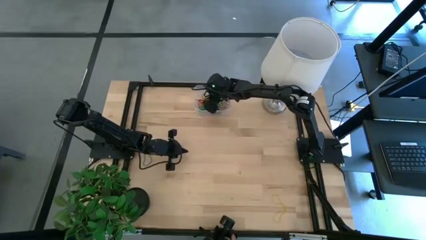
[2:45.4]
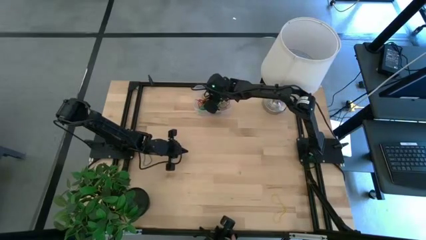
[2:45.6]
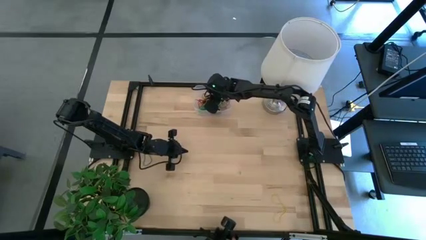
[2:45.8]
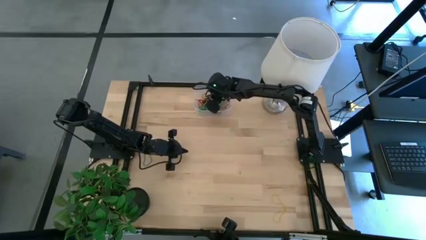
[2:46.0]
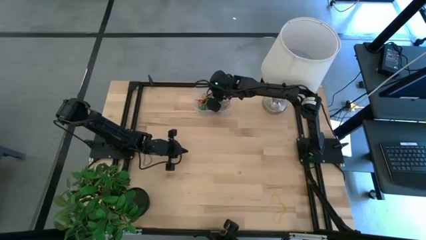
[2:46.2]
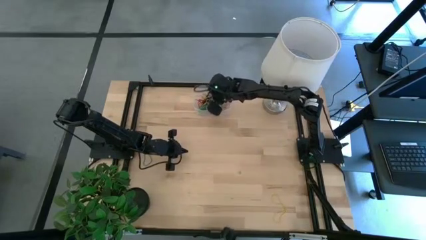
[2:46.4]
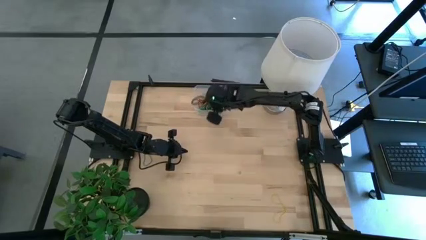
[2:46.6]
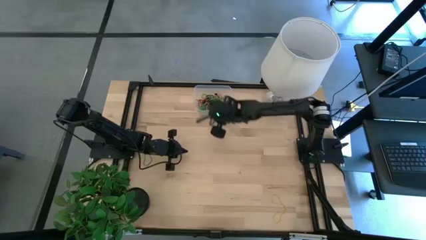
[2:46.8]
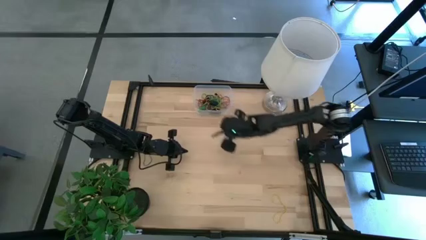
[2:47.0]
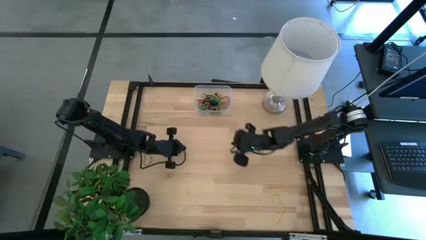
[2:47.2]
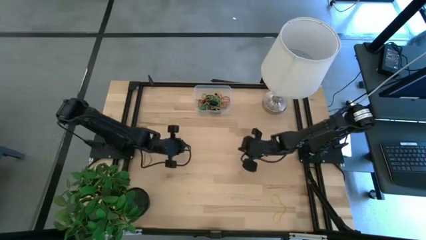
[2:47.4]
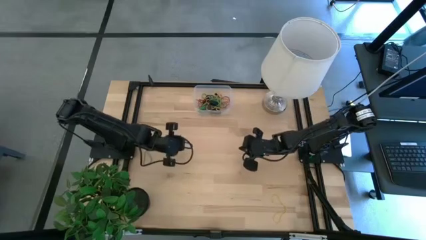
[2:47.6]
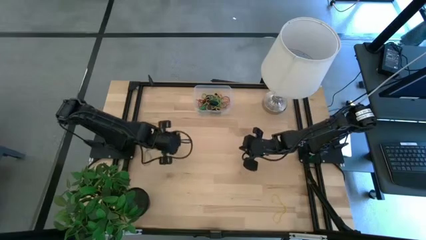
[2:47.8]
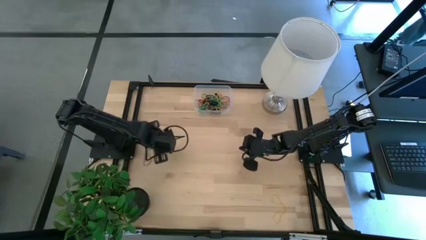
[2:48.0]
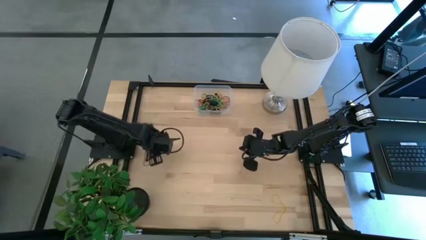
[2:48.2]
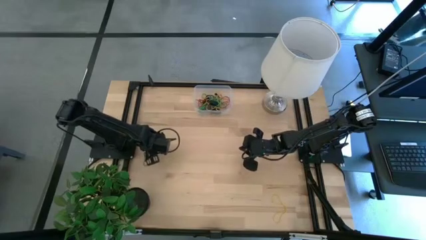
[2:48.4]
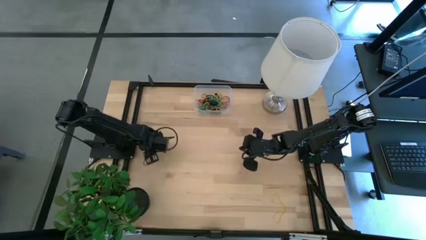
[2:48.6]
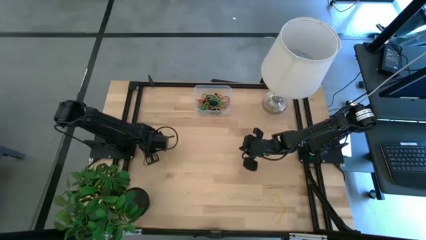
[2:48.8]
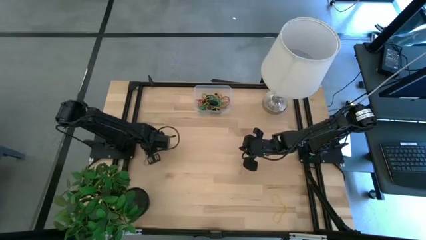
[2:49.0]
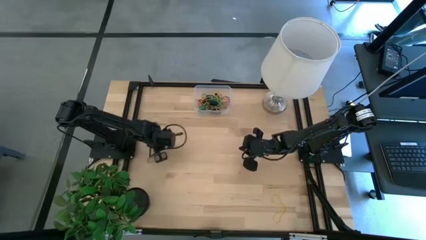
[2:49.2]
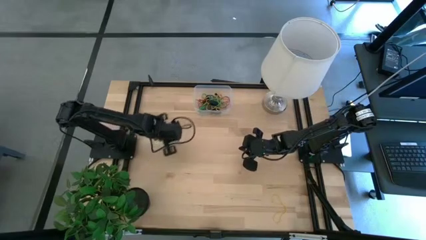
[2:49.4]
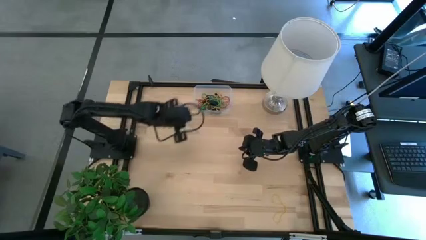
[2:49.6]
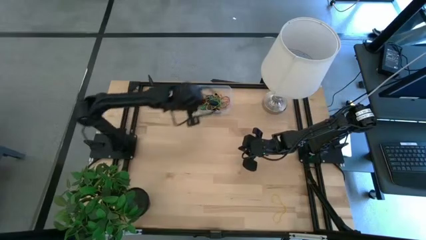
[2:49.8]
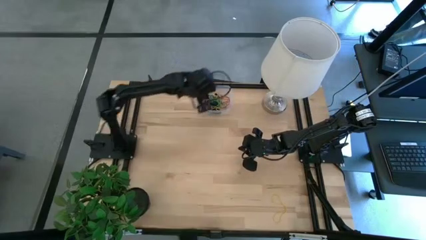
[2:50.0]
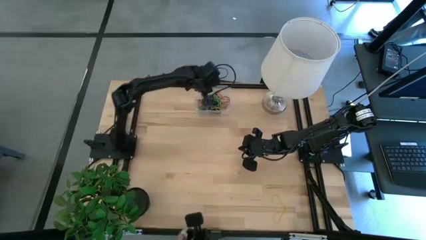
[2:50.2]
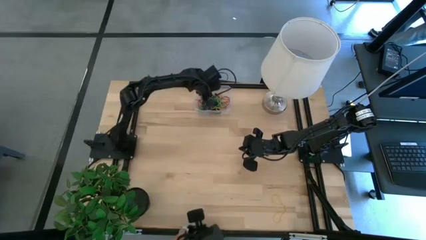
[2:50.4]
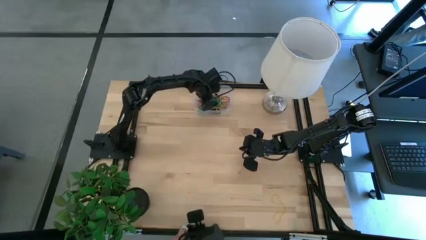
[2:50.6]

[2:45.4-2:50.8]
Task: Pick and place rubber bands into bin
Put the blue rubber band into the transparent bin

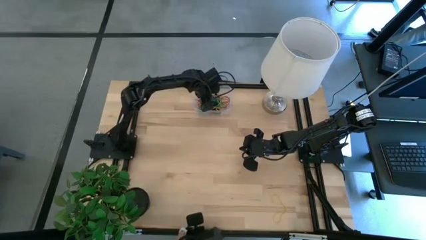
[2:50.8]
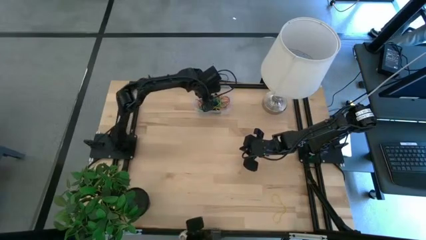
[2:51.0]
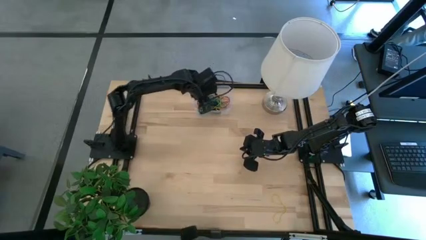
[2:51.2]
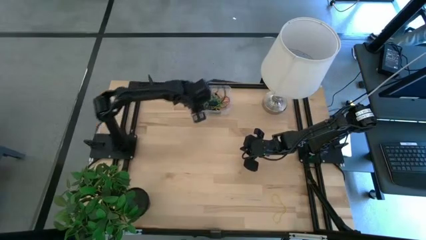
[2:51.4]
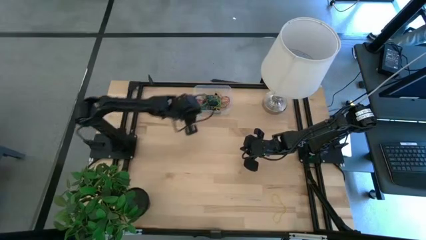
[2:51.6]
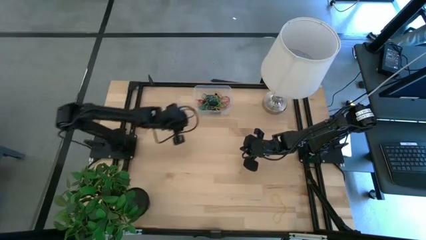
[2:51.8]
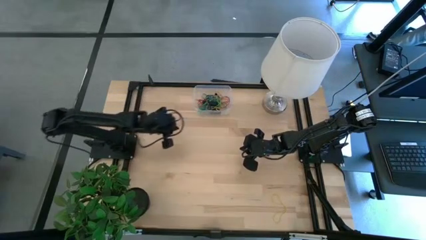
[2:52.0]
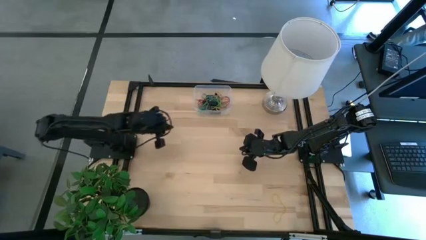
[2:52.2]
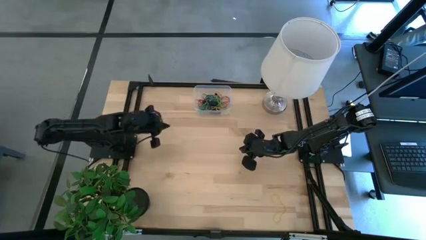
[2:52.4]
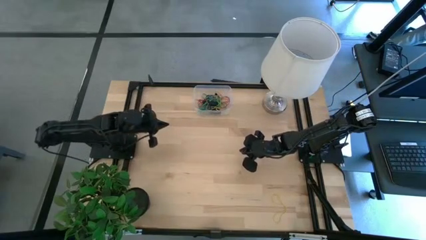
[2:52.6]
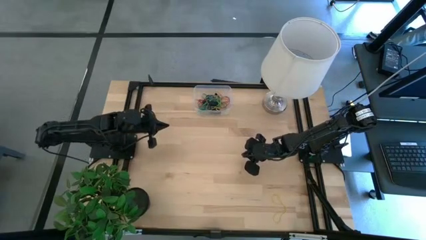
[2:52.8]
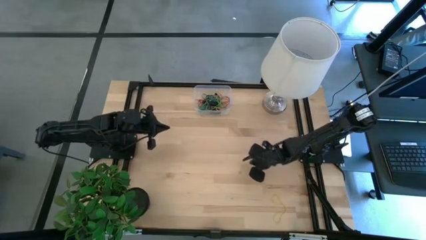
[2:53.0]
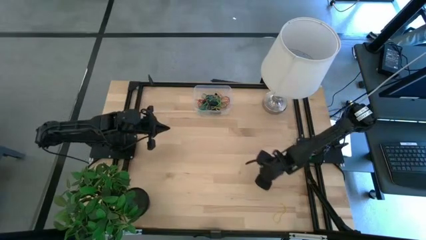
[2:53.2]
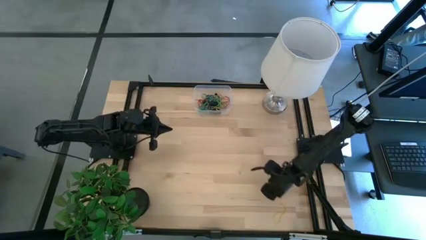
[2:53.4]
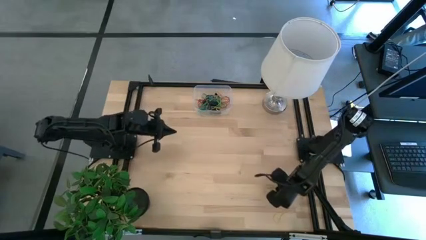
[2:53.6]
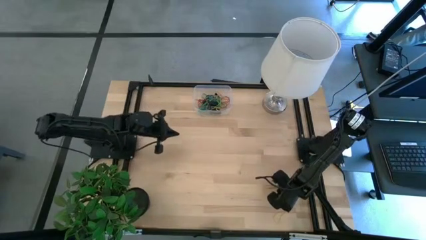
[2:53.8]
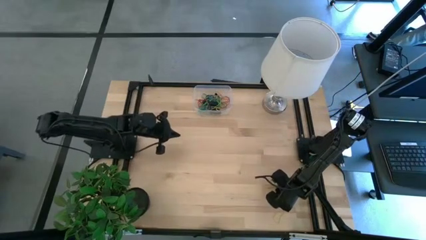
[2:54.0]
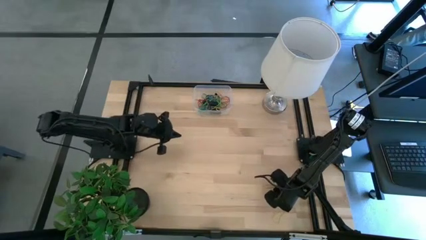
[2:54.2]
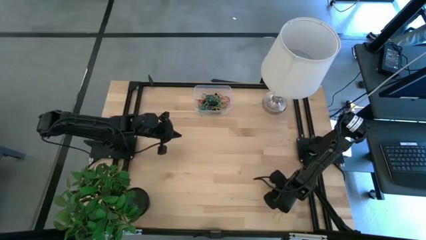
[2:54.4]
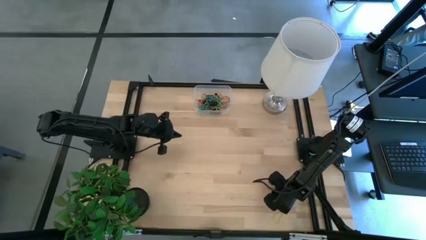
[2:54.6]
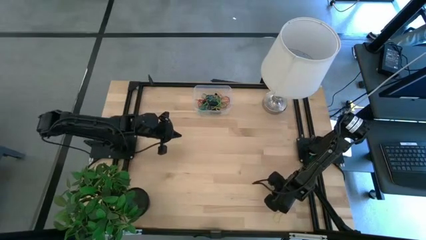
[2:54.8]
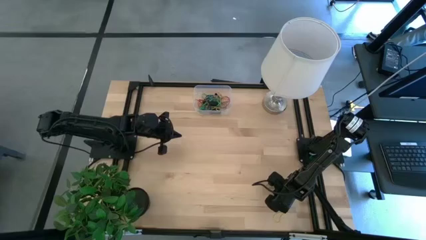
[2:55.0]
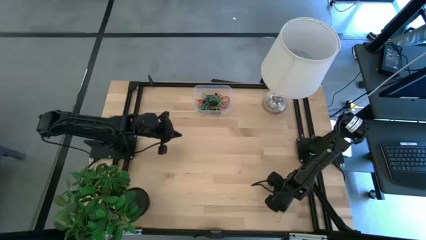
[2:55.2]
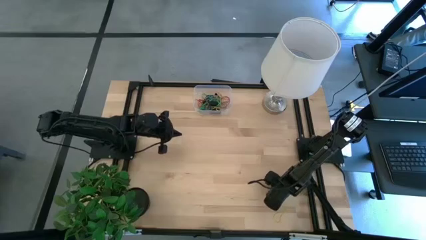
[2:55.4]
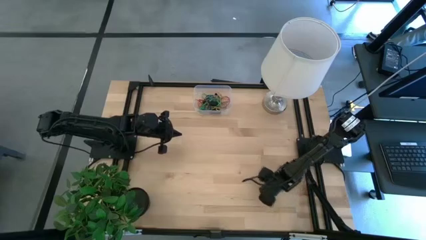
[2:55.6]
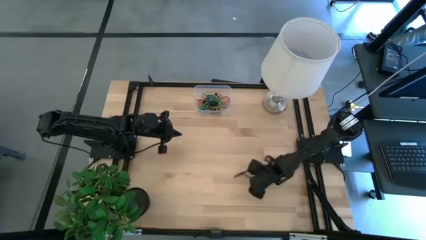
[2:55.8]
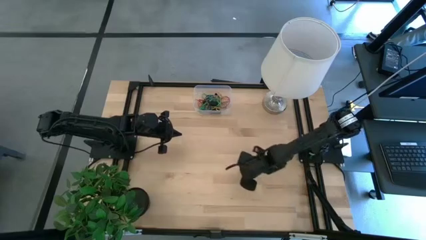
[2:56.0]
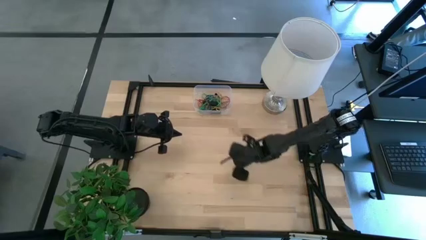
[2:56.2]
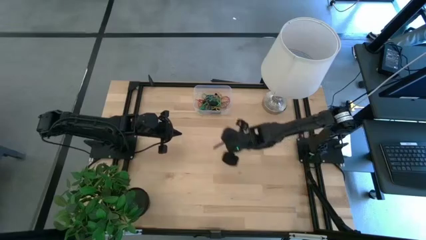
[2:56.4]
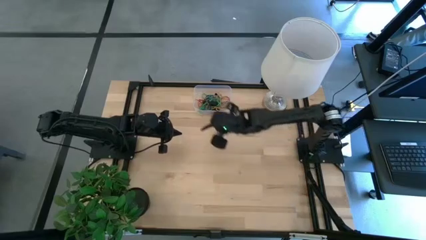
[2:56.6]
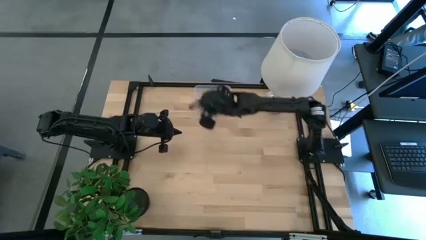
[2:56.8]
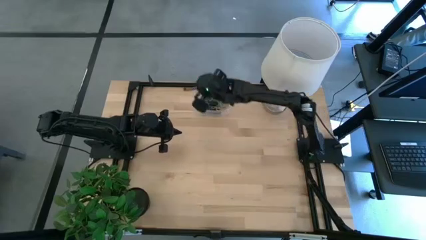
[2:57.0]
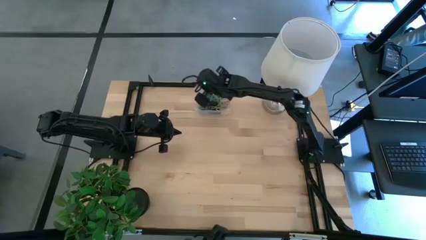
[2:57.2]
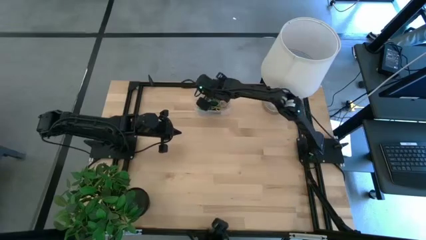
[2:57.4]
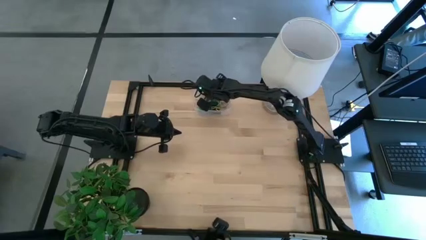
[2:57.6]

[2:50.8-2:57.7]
Put the yellow rubber band into the transparent bin

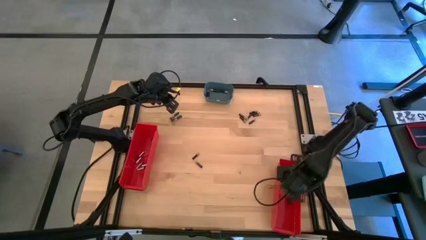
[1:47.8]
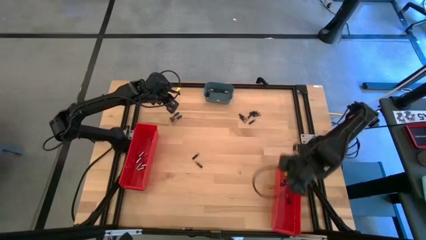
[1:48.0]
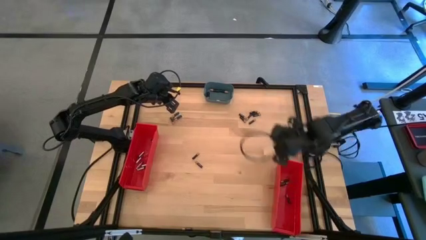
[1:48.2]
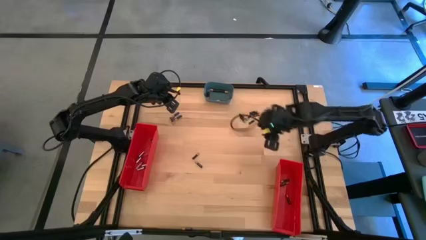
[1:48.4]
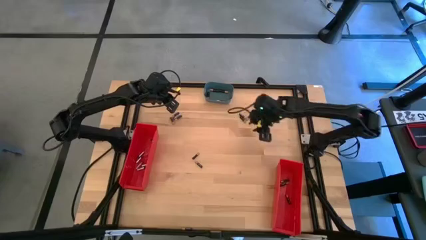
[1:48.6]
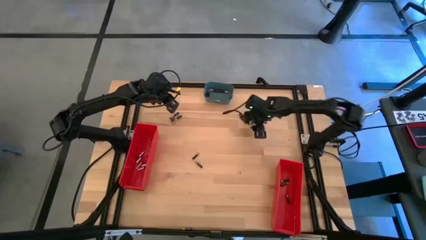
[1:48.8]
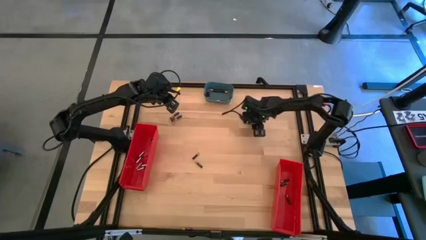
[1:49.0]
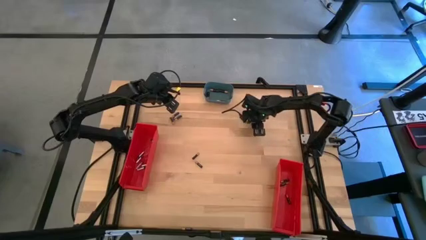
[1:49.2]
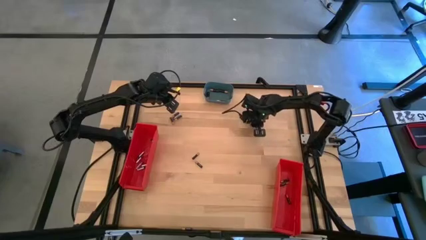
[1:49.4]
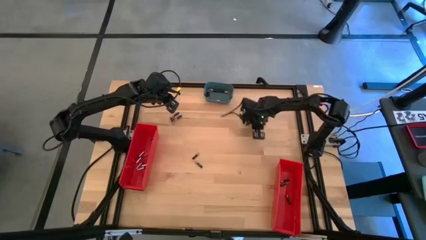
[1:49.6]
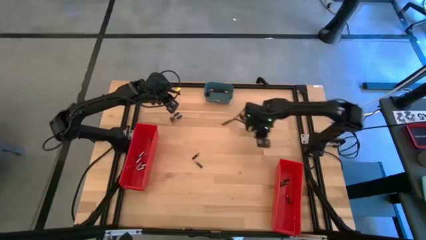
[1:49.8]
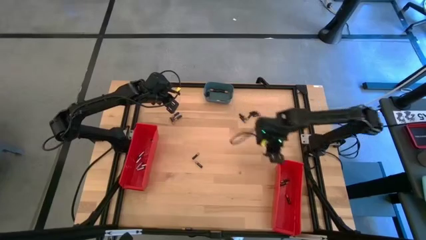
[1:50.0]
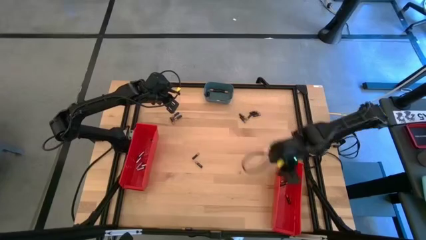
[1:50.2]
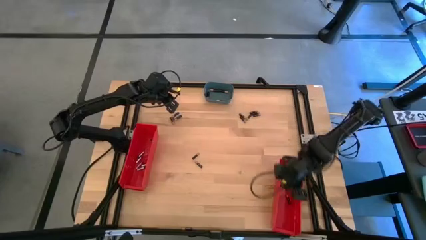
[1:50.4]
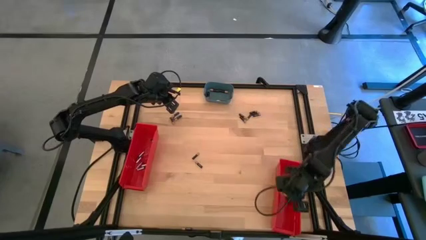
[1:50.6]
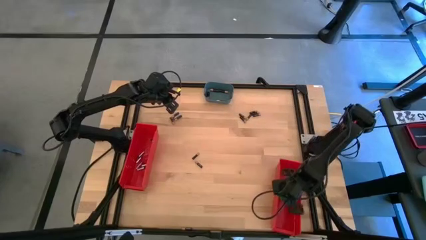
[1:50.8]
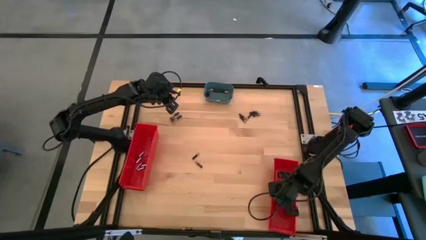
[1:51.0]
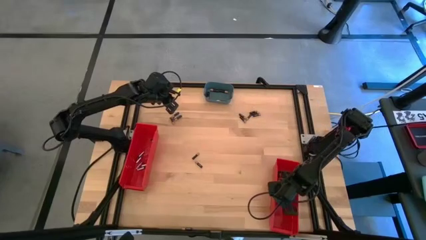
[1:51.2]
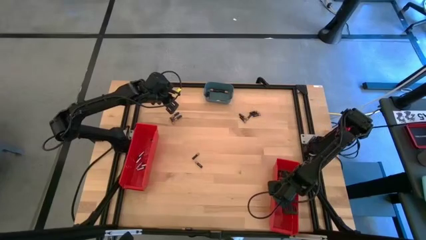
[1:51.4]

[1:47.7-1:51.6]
Task: Sort batteries
Put the small brown battery into the right red bin
